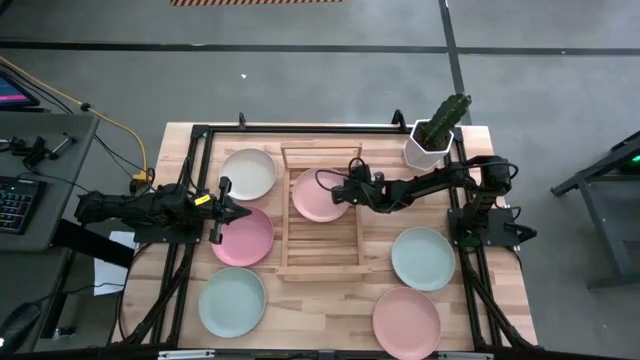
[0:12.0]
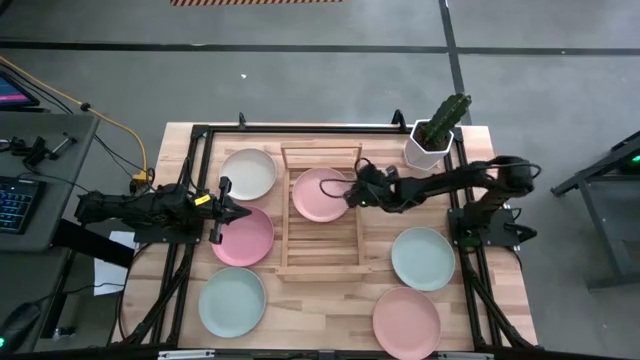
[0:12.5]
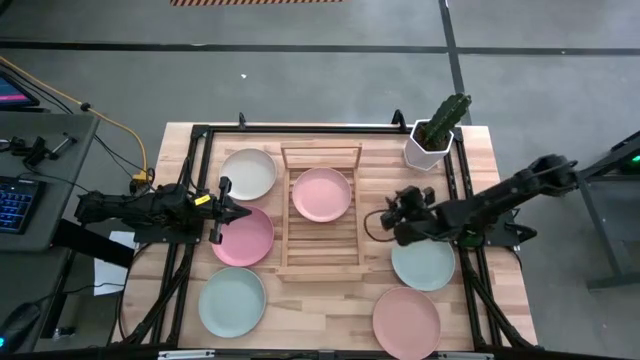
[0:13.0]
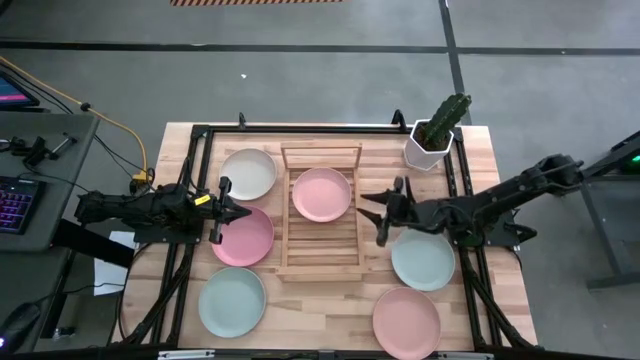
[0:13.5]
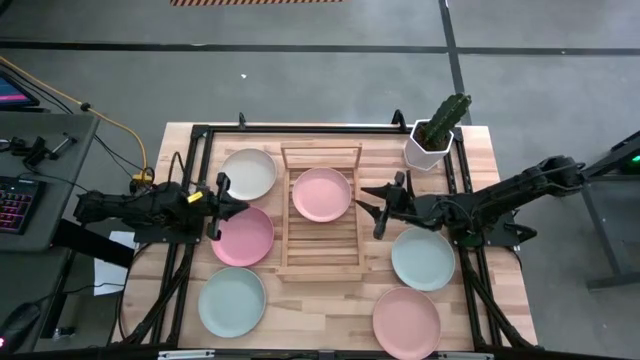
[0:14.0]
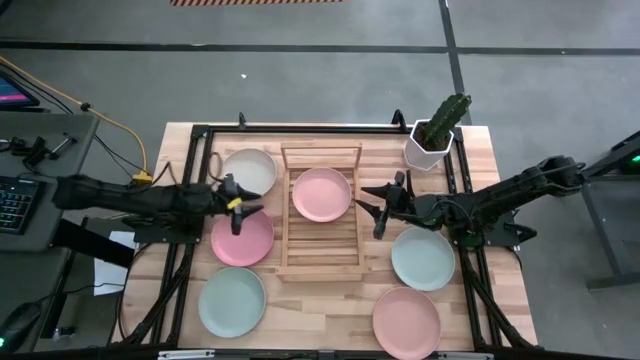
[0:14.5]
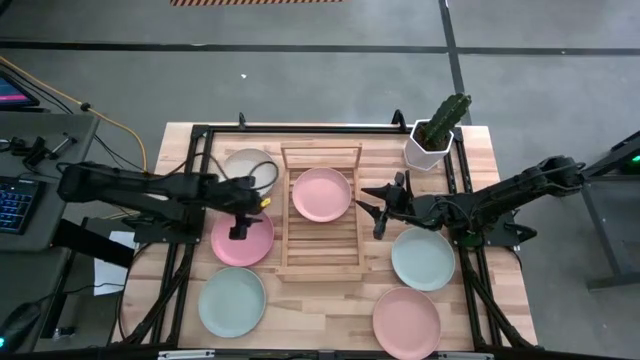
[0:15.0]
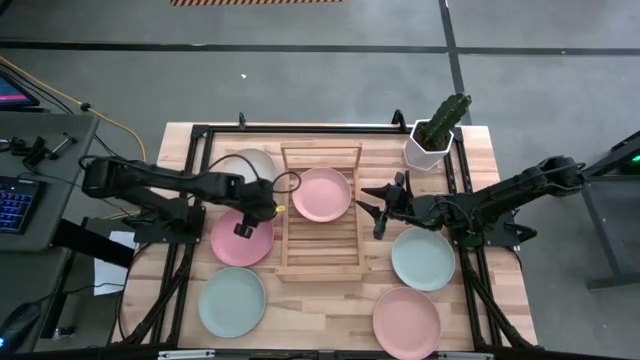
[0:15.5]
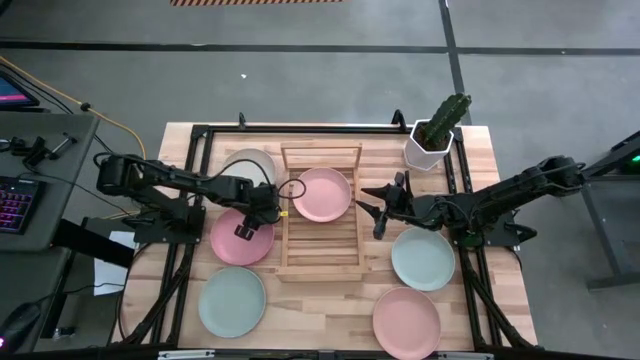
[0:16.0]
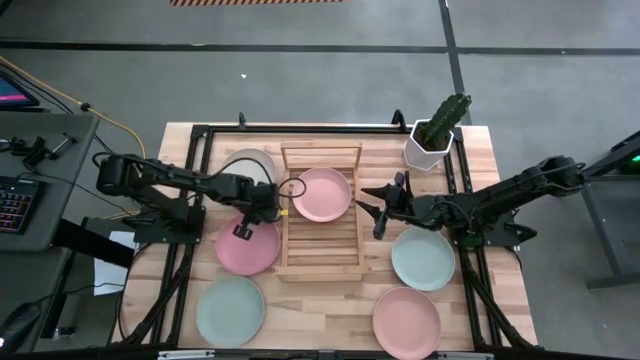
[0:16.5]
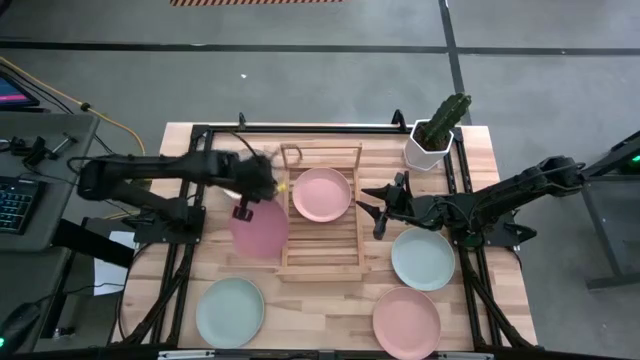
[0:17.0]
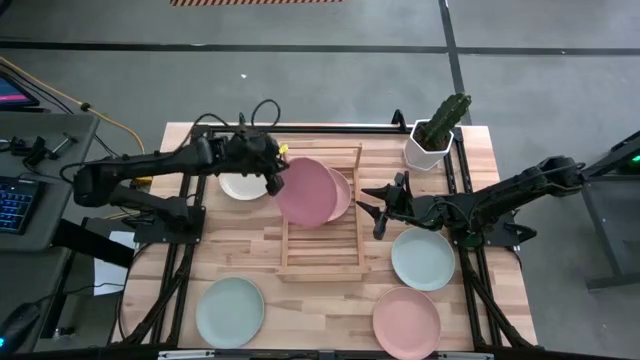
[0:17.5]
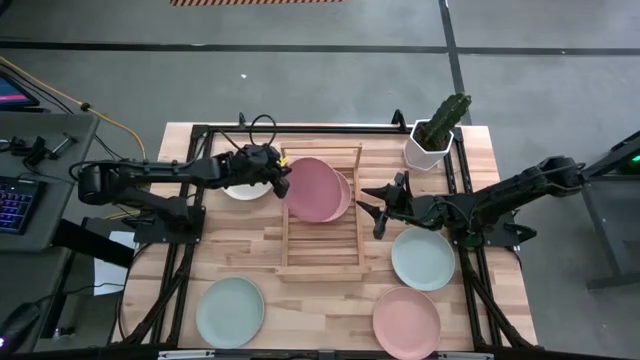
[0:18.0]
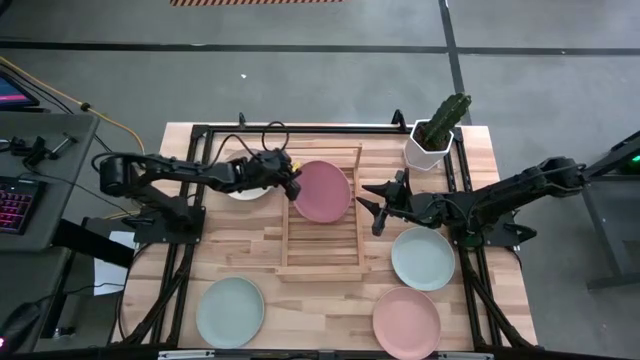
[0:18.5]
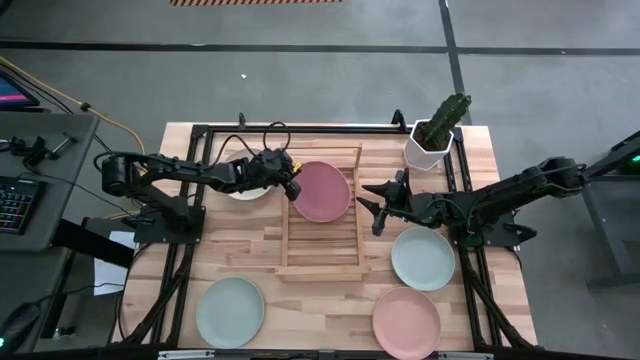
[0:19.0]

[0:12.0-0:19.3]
Task: Place and stack plates onto a shelf
Stack the pink plate on top of the light pink plate on the shelf

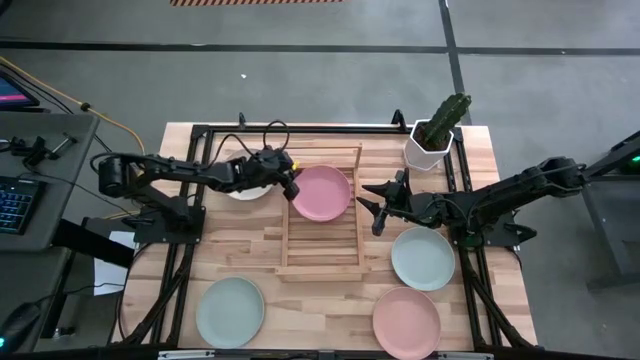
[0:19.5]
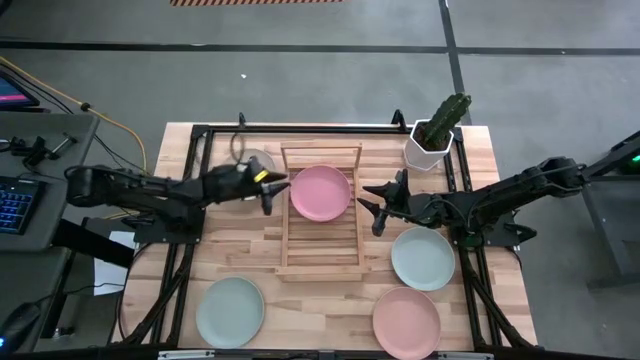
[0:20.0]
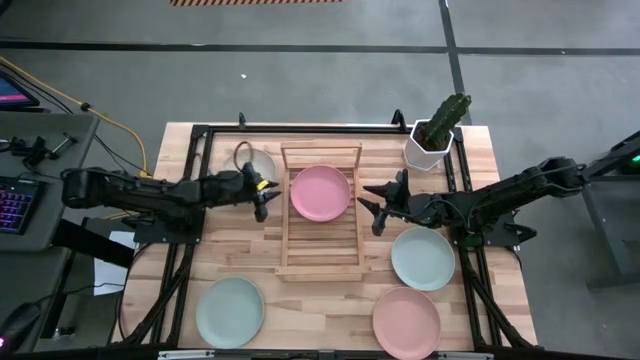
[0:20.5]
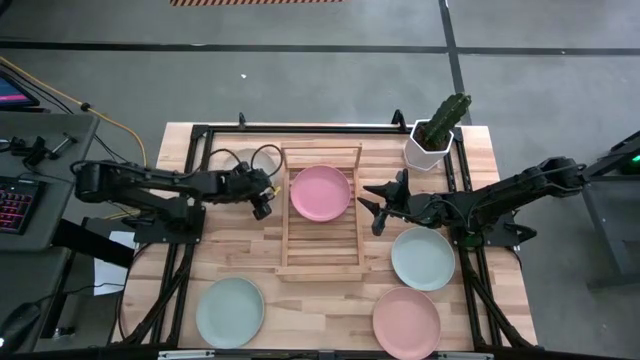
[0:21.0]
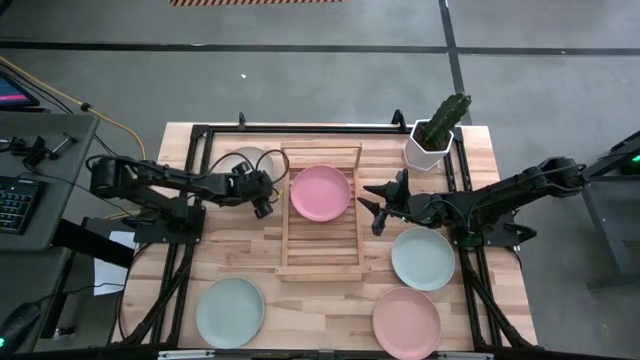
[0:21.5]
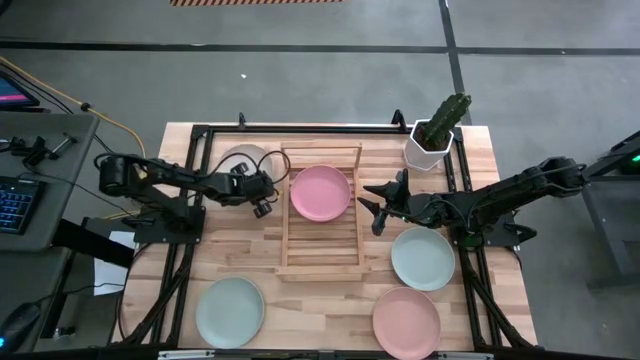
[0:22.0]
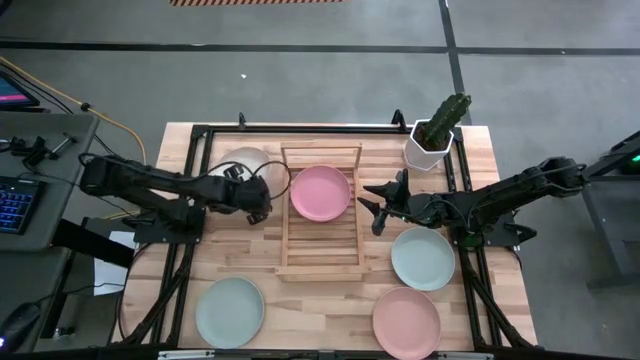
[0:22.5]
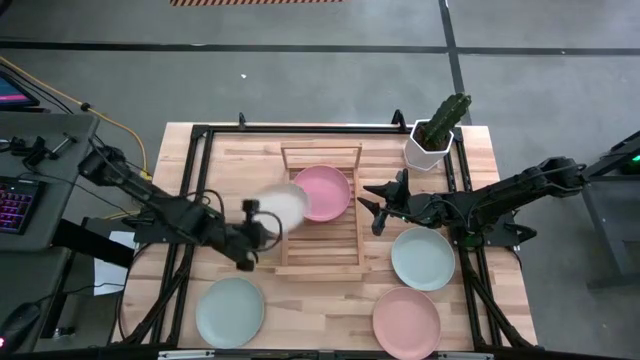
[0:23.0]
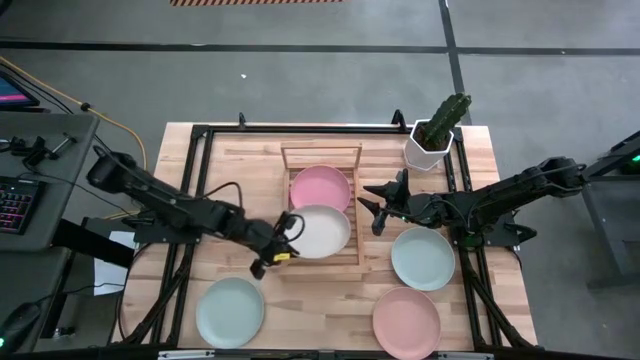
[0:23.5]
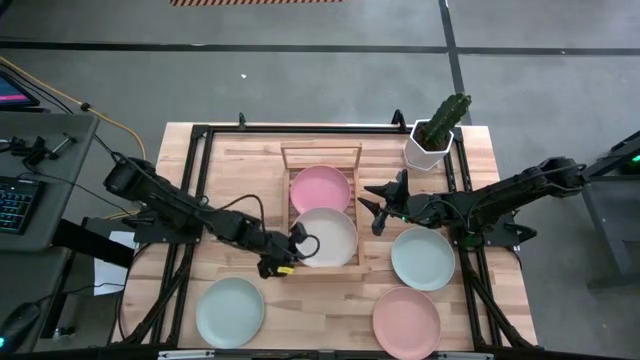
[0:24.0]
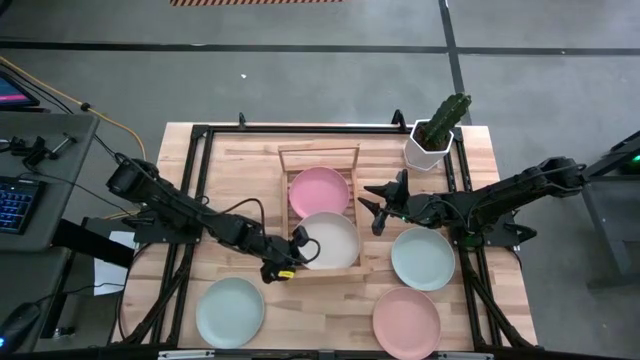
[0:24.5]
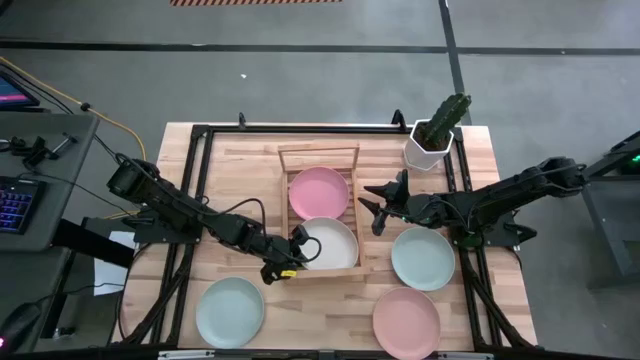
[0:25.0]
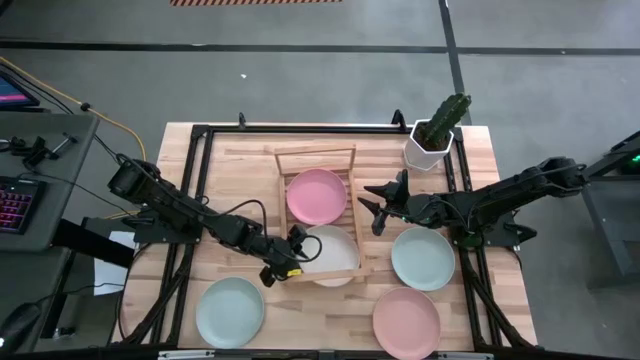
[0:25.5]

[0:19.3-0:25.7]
Put the gray plate on the shelf

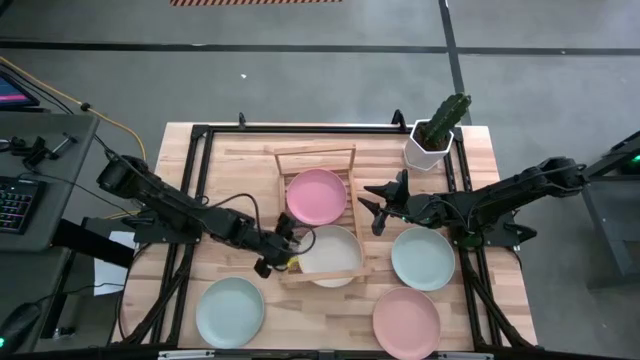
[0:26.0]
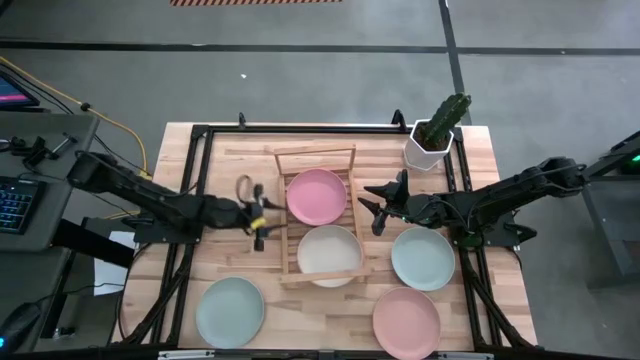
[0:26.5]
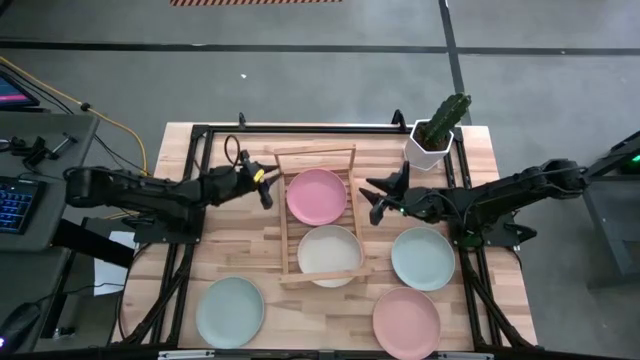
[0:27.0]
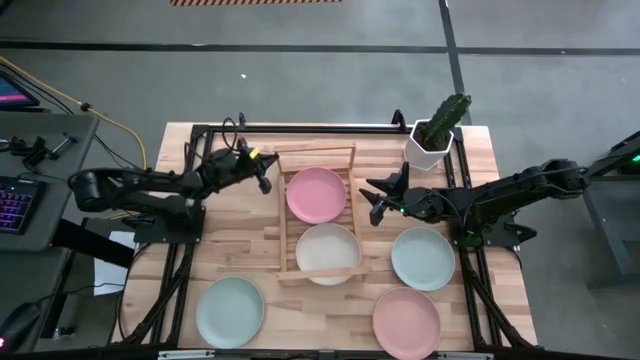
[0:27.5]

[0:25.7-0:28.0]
Adjust the shelf

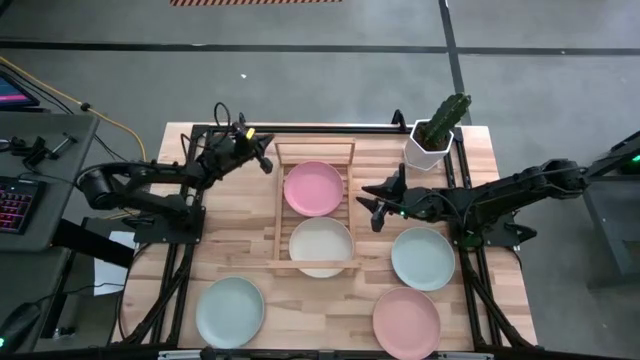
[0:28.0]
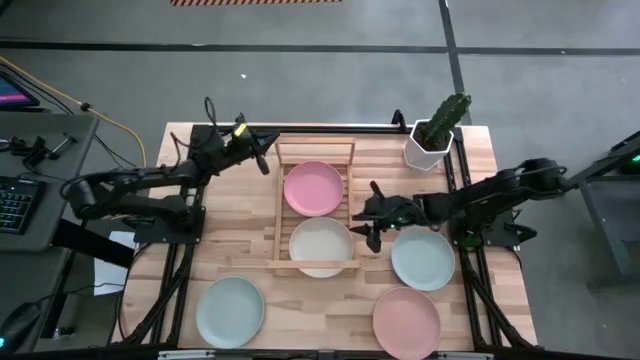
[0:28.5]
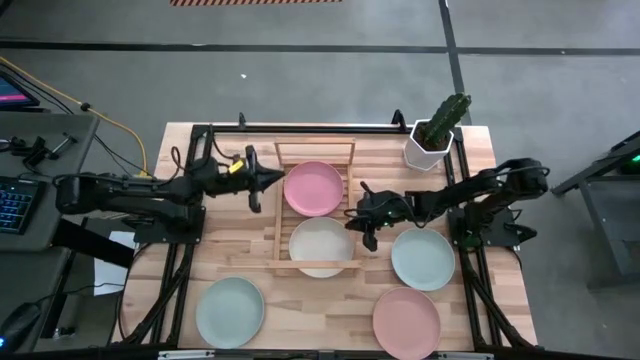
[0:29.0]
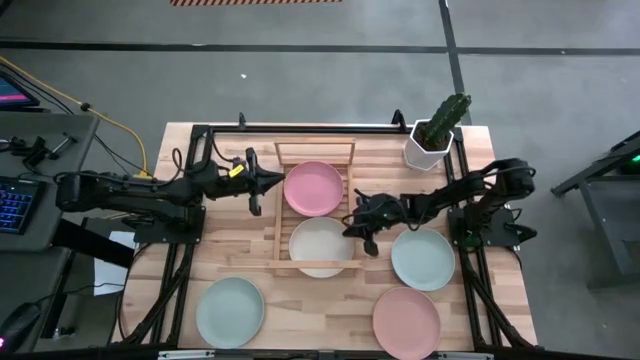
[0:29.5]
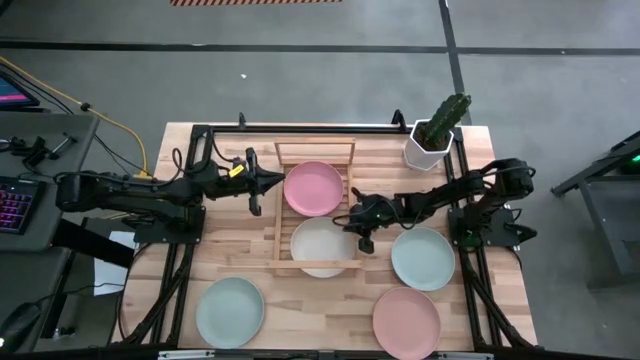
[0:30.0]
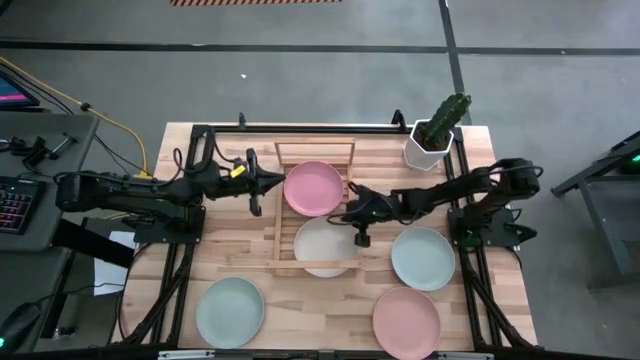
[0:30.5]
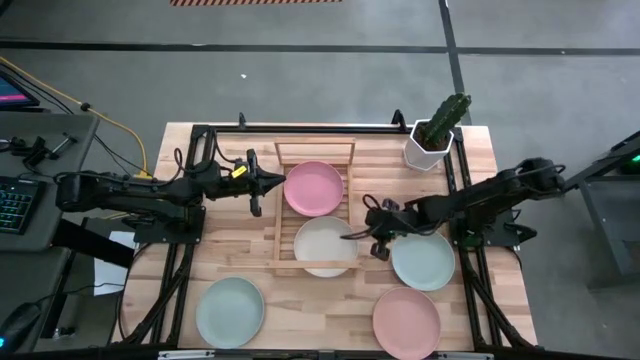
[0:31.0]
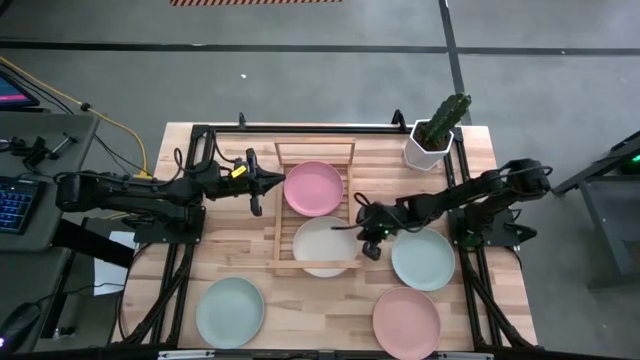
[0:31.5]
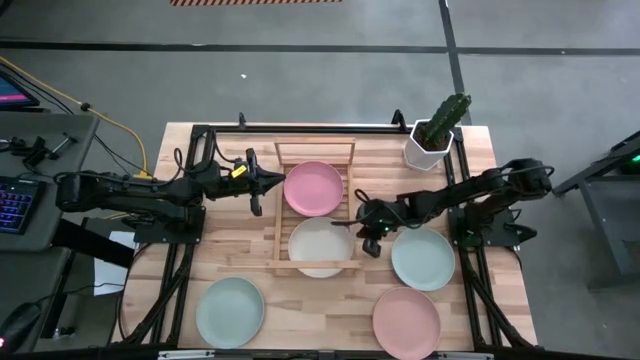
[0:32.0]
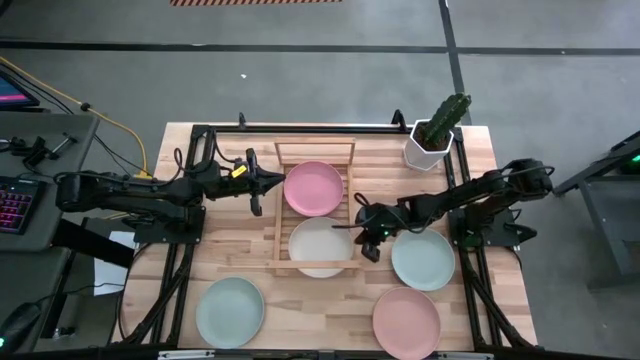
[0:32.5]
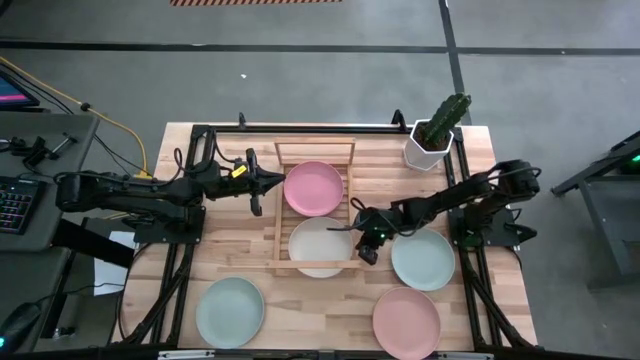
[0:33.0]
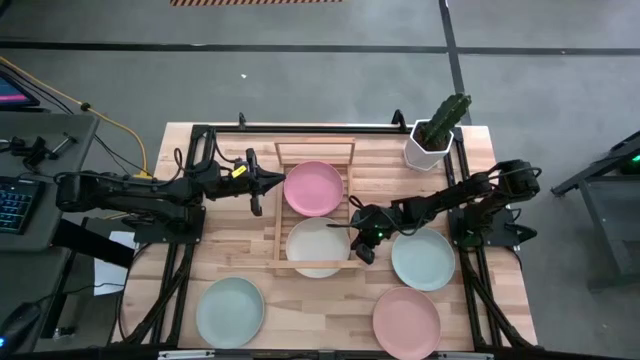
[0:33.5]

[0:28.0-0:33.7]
Adjust the gray plate on the shelf
